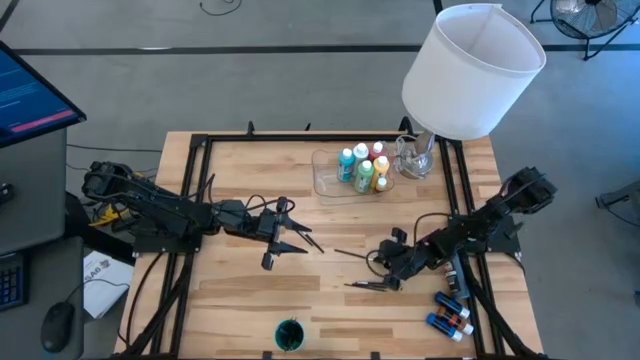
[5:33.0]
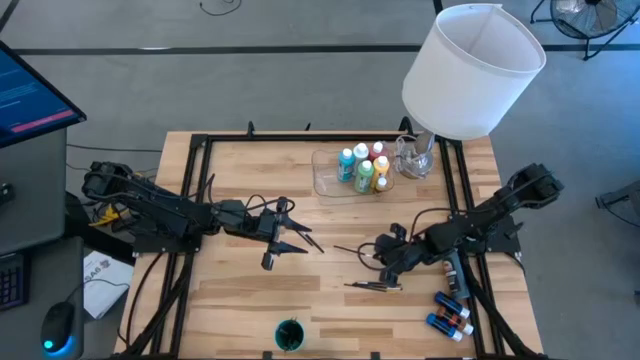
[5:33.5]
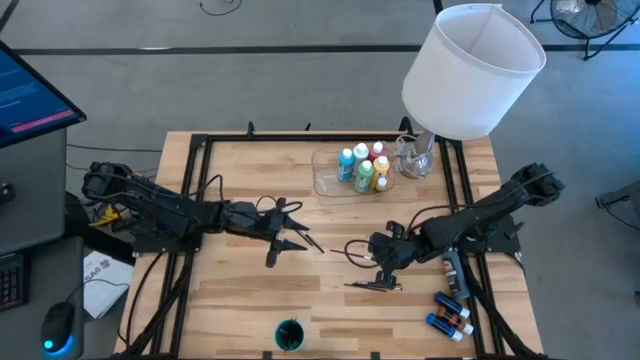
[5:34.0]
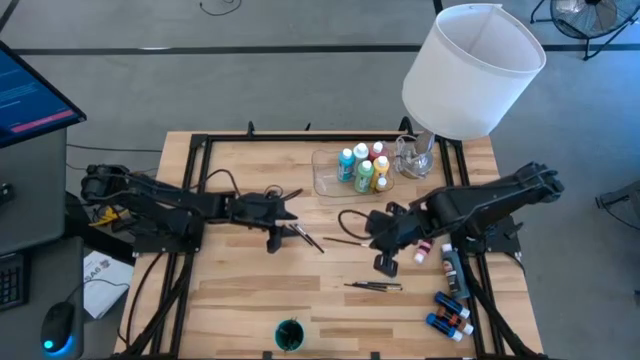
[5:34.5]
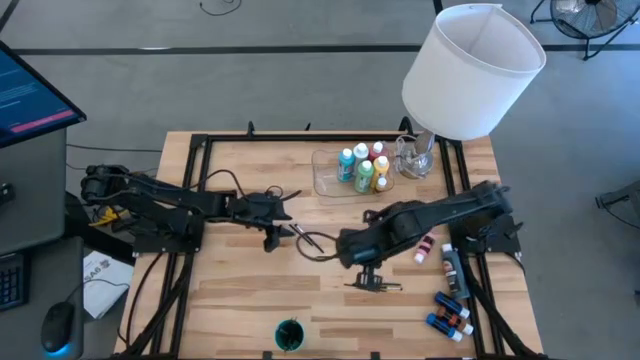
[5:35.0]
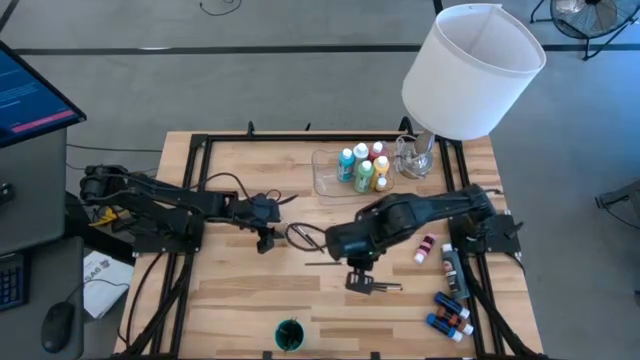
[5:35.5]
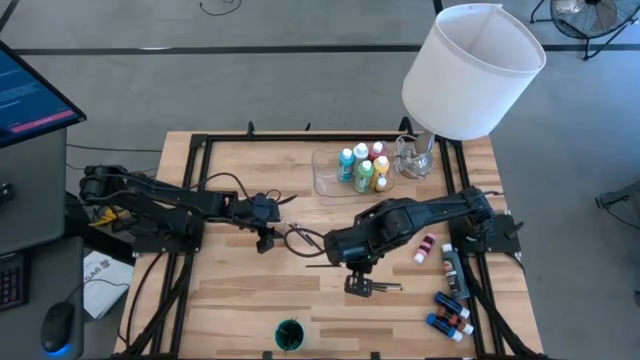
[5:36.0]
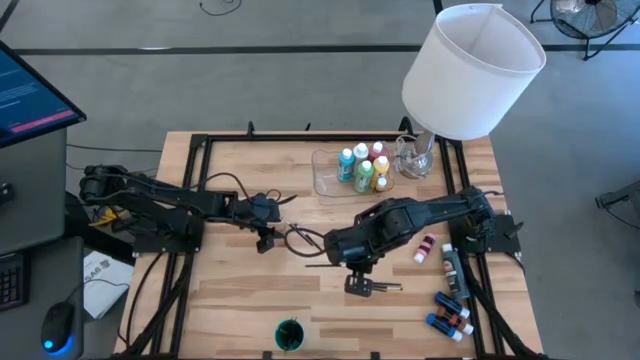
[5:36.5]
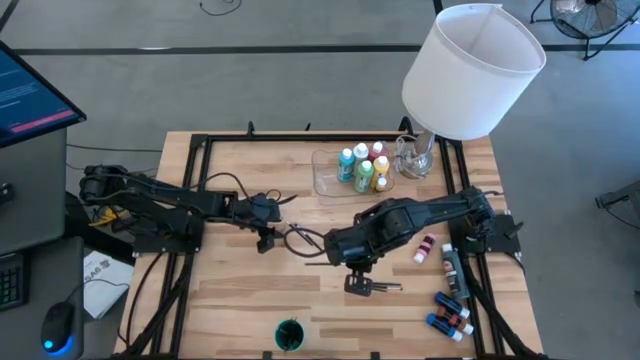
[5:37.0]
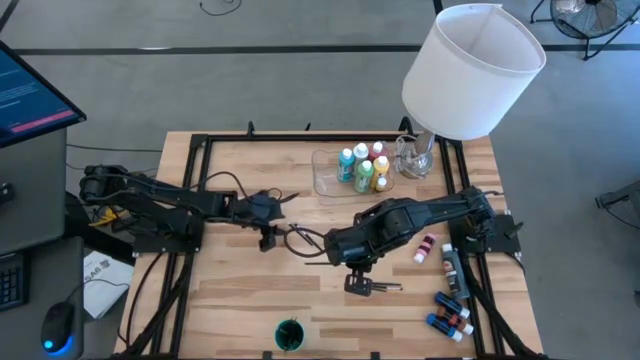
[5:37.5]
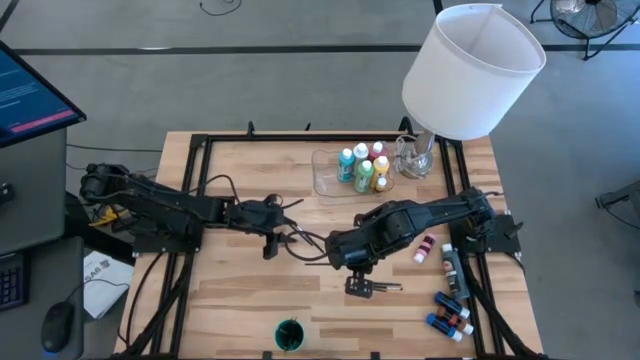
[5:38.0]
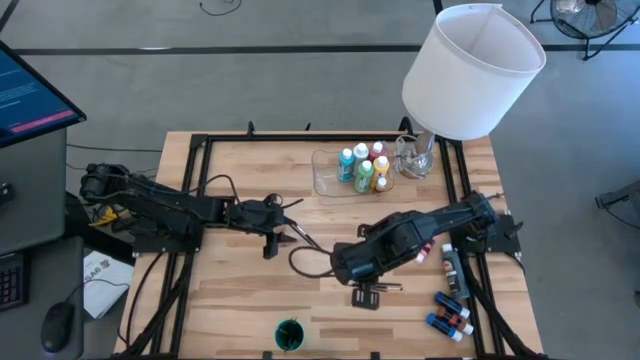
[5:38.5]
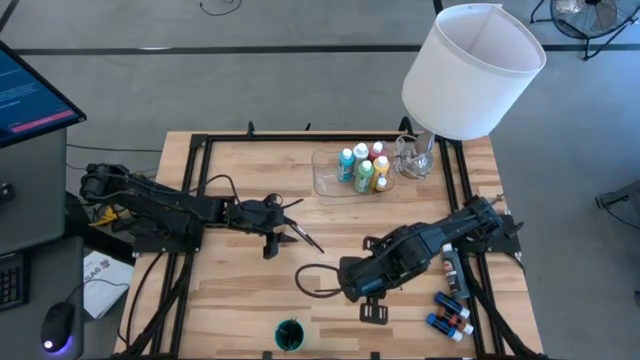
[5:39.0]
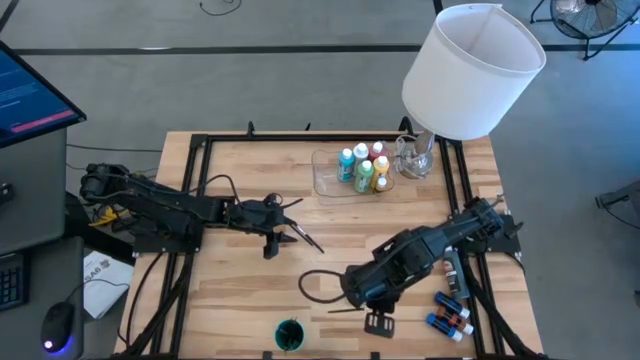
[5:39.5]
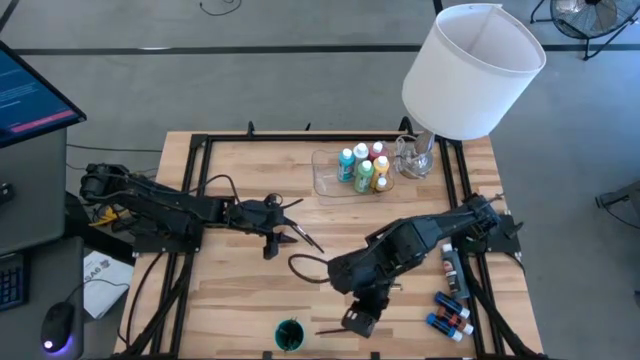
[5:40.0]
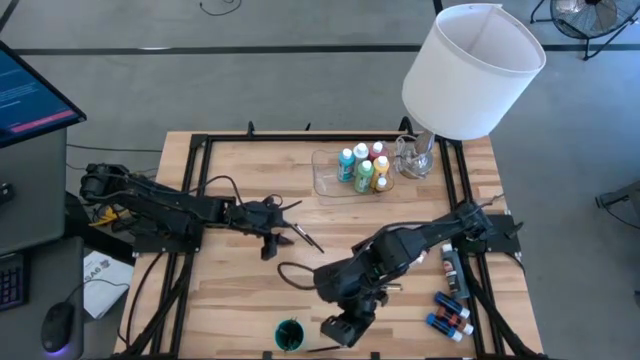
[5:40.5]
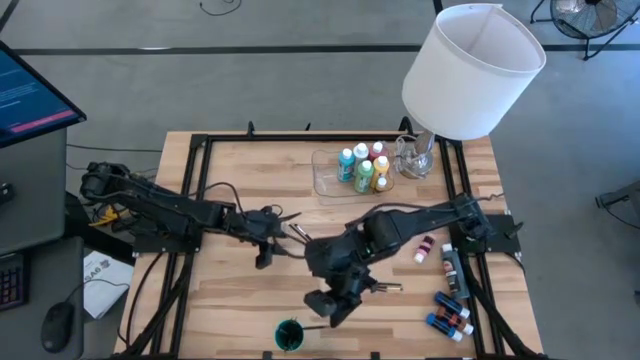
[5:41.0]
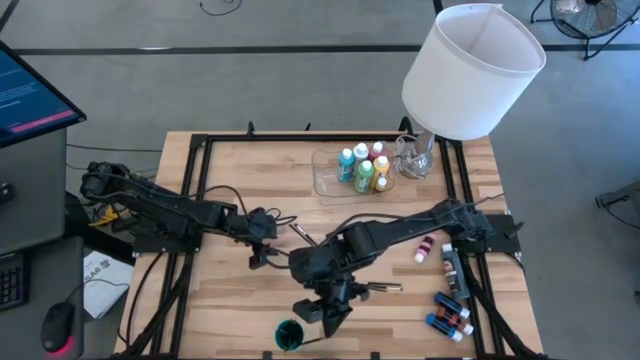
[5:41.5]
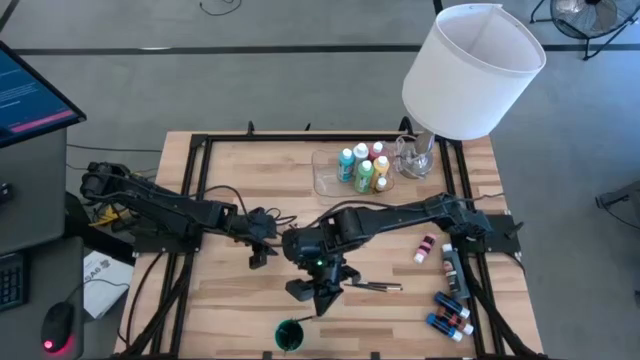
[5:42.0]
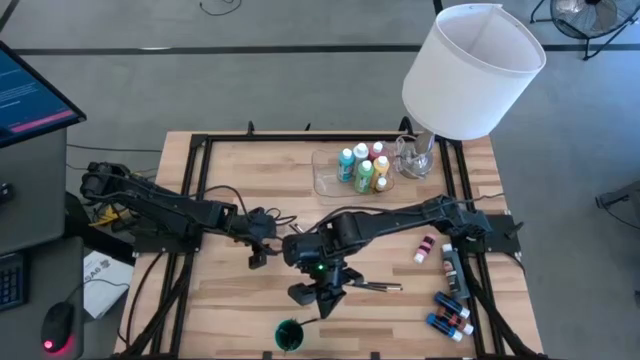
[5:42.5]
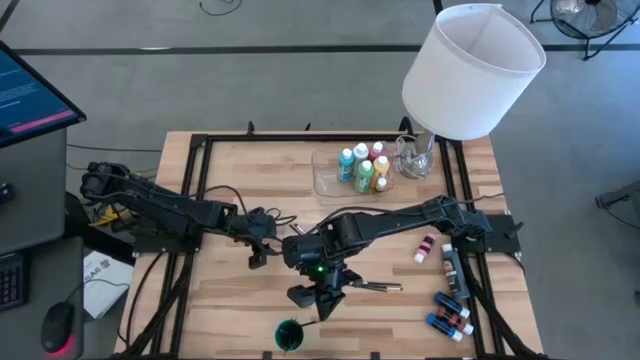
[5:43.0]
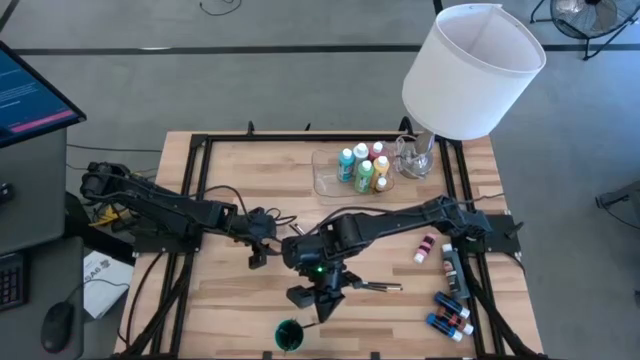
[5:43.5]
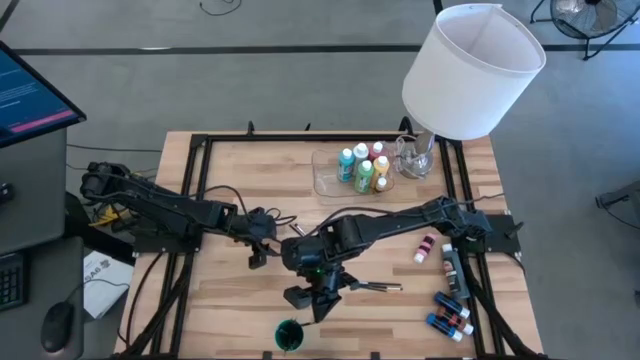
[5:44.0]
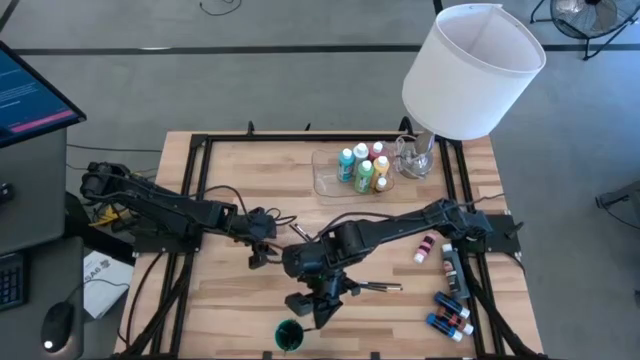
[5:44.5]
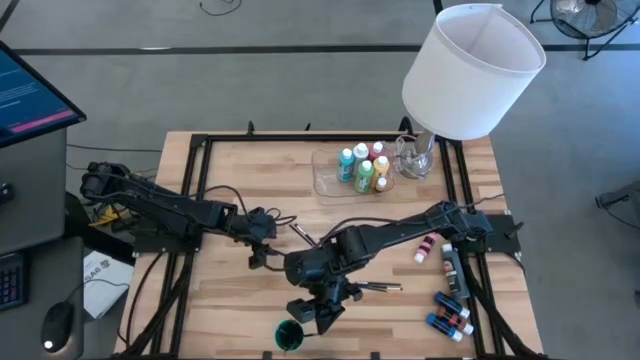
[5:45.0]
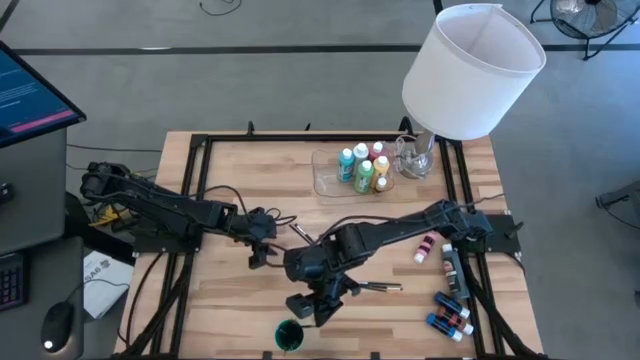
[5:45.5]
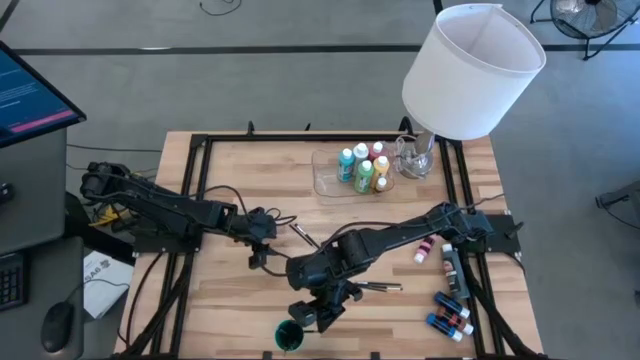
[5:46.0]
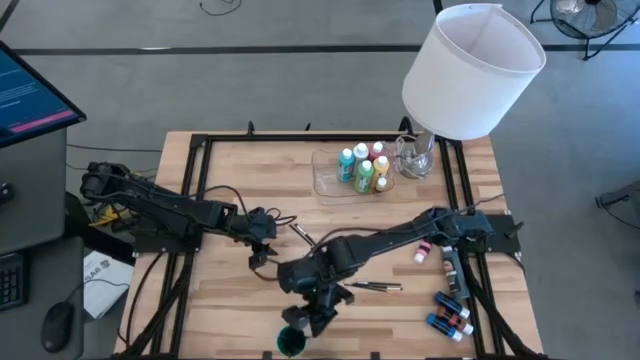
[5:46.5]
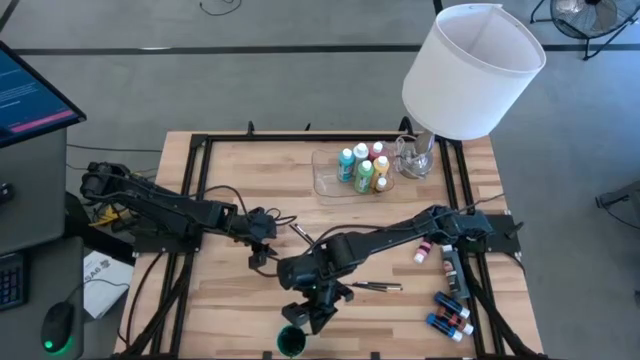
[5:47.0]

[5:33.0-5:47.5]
Task: Pick & Place Paint Supplies
Put the silver paintbrush into the green cup
